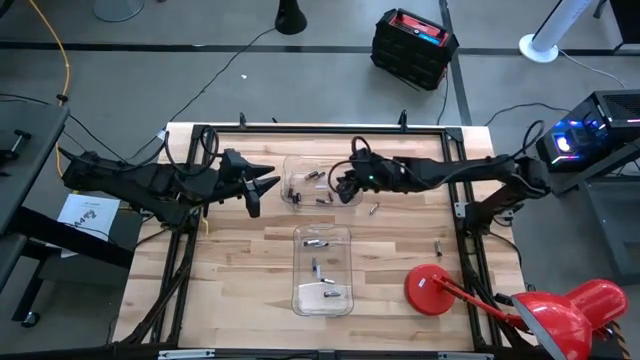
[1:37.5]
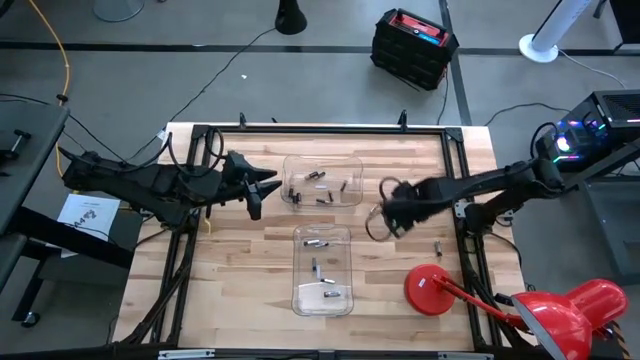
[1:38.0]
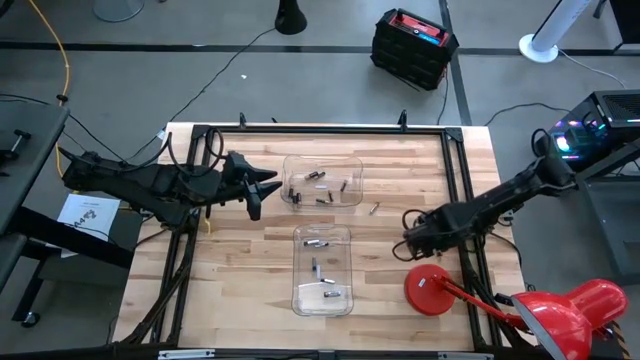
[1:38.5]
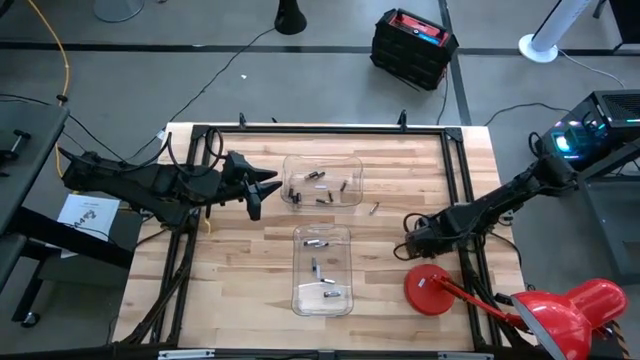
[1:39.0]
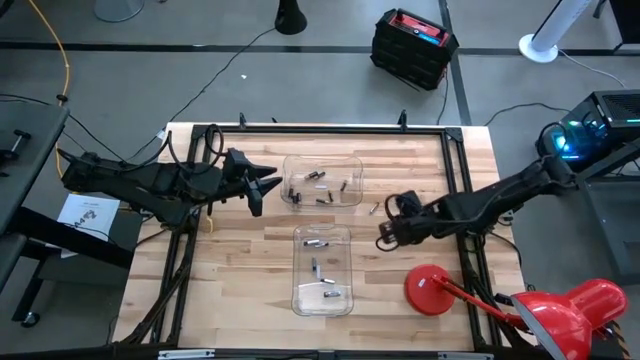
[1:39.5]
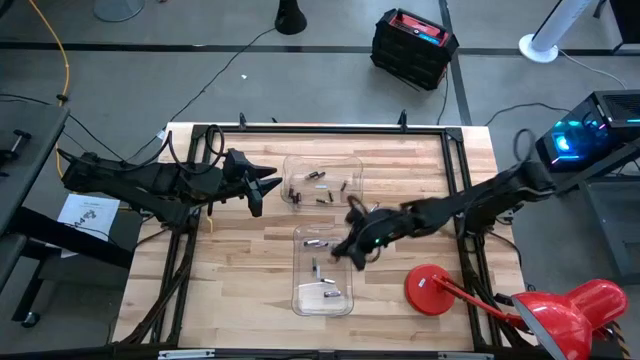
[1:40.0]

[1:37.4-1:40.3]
Task: Sort batteries
Put the silver battery into the bottom transparent bin

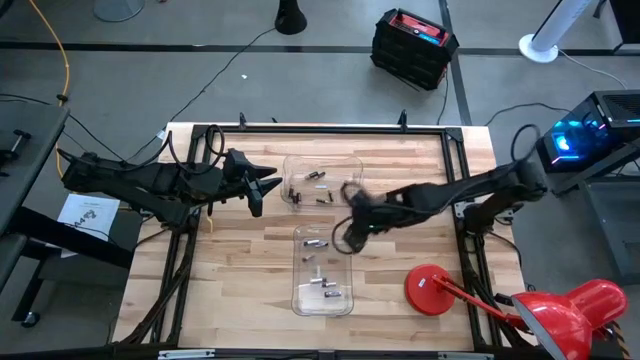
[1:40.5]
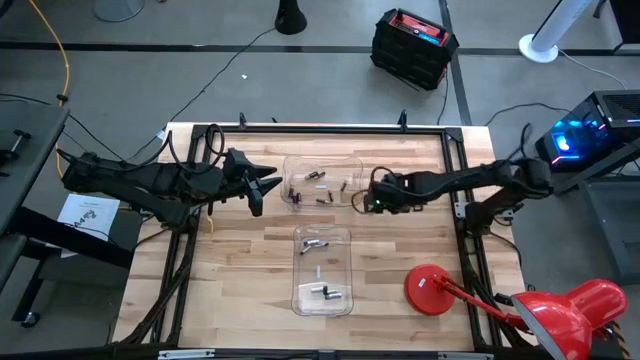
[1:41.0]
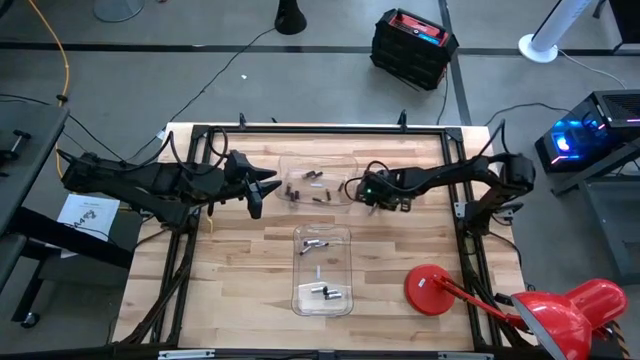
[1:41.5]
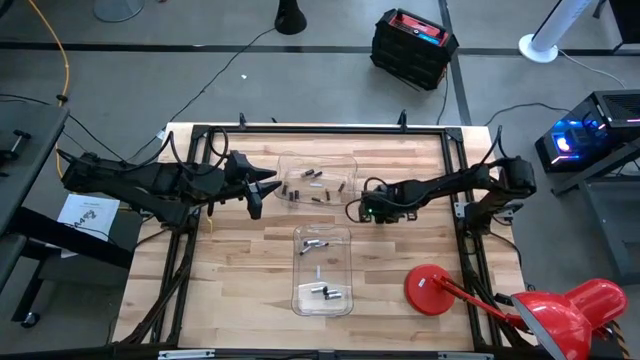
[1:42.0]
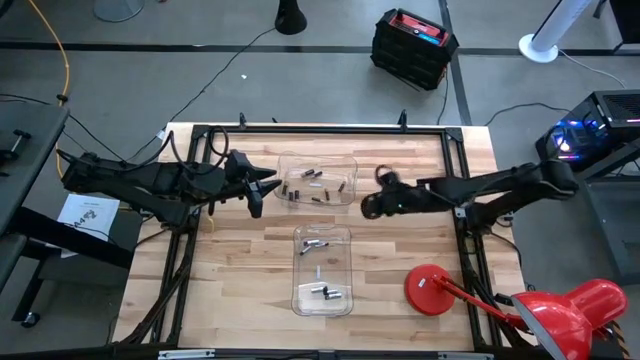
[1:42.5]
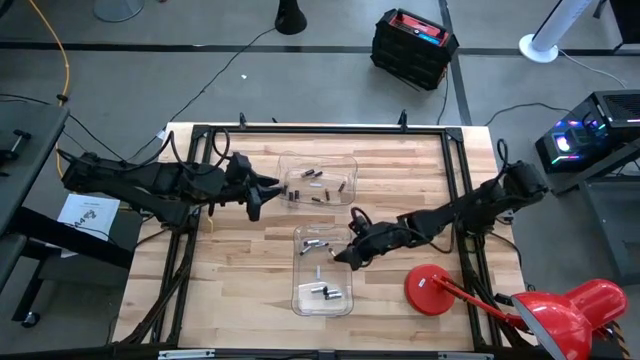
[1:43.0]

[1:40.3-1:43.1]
Put the silver battery into the bottom transparent bin

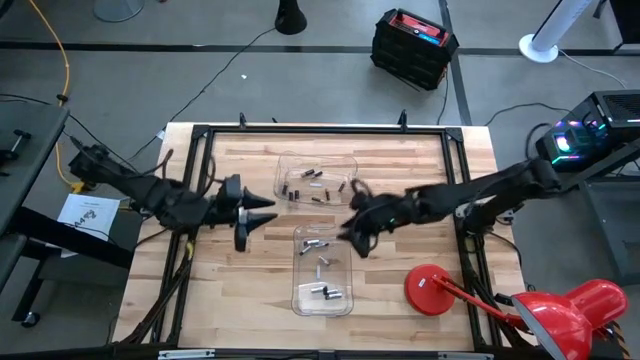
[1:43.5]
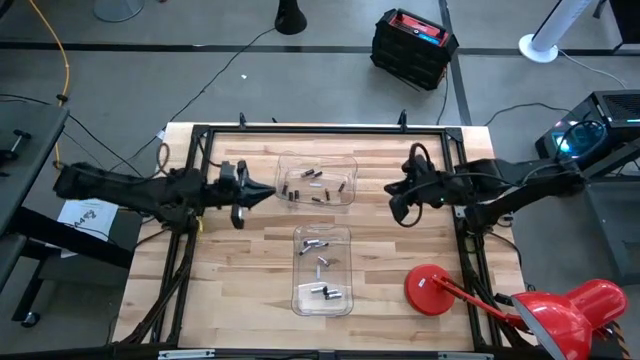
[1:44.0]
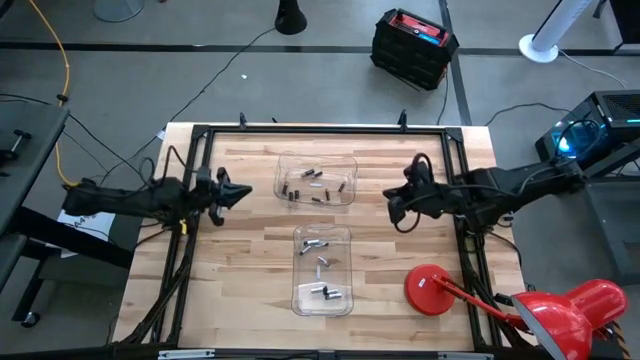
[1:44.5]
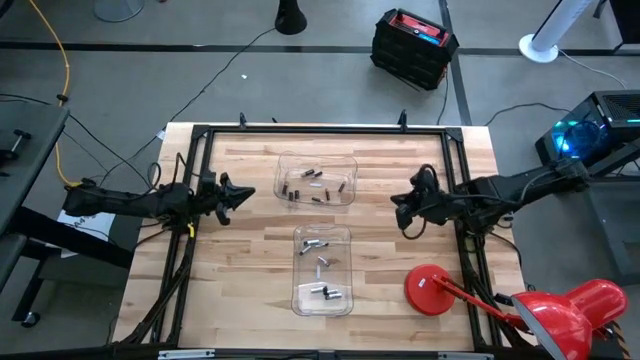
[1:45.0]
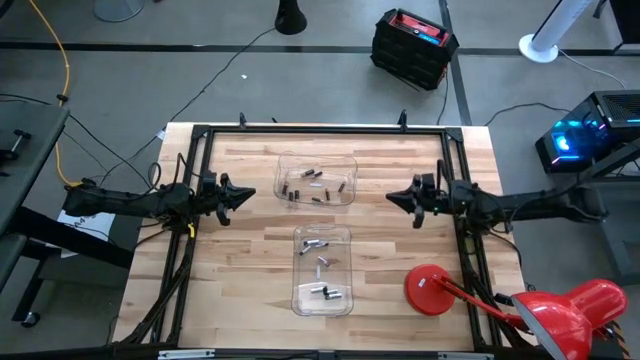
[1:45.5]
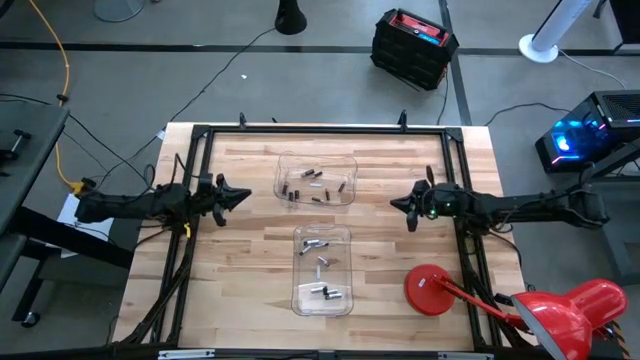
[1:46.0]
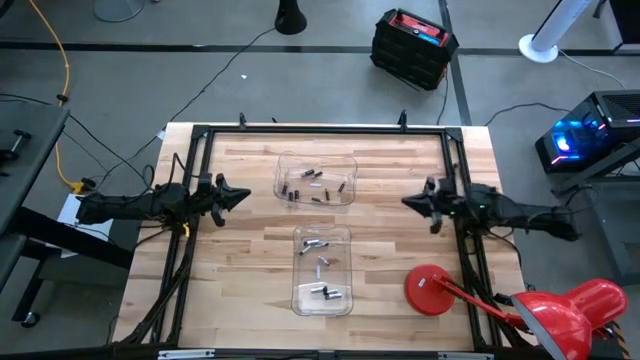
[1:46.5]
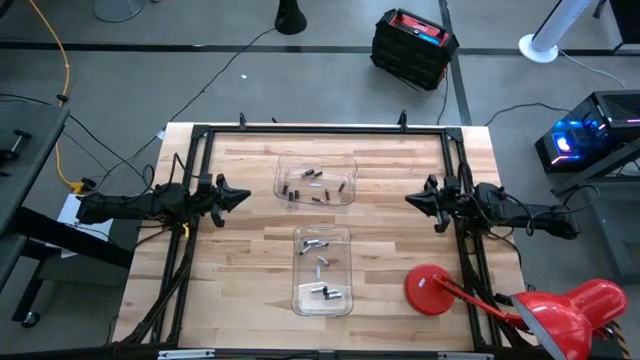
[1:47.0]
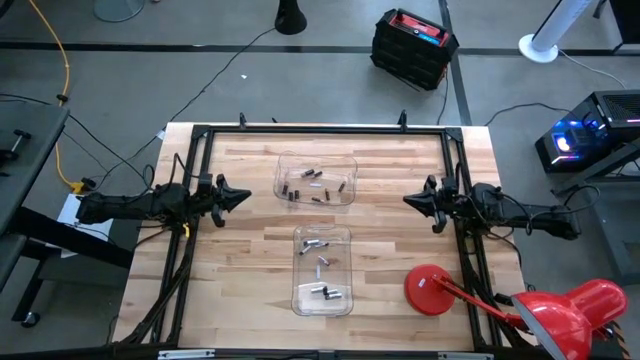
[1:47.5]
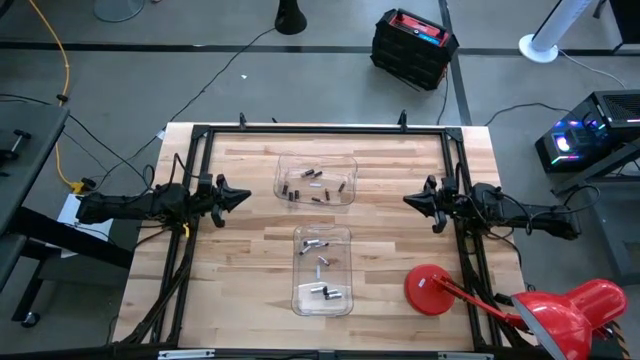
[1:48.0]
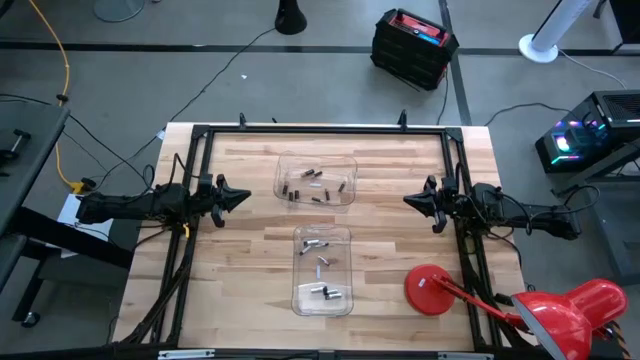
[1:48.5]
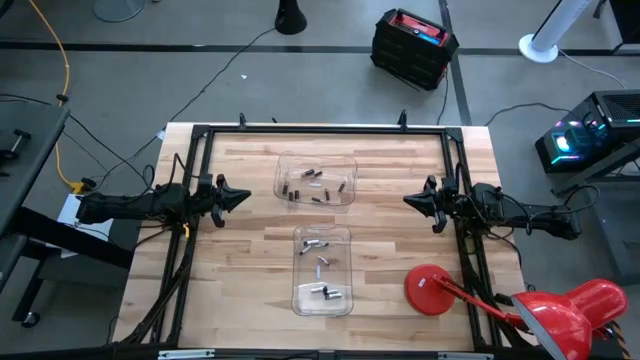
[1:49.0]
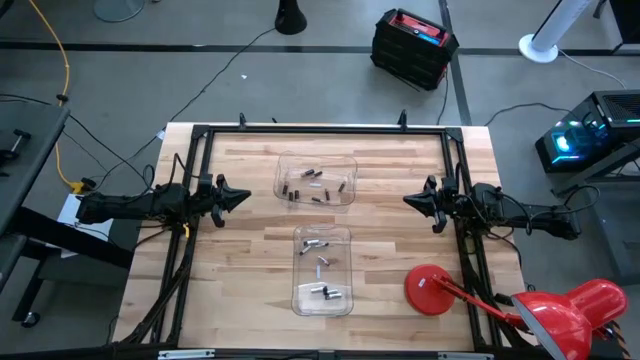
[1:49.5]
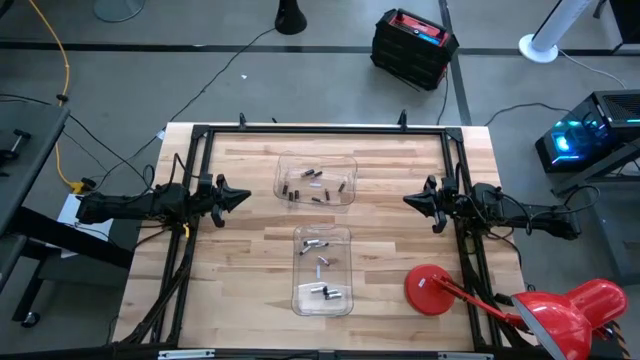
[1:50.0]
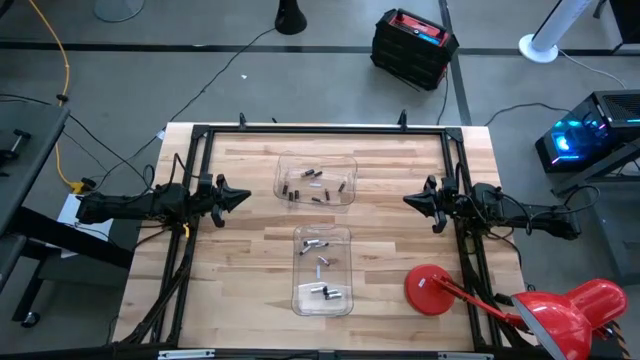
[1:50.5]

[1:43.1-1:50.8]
Return to Home Position

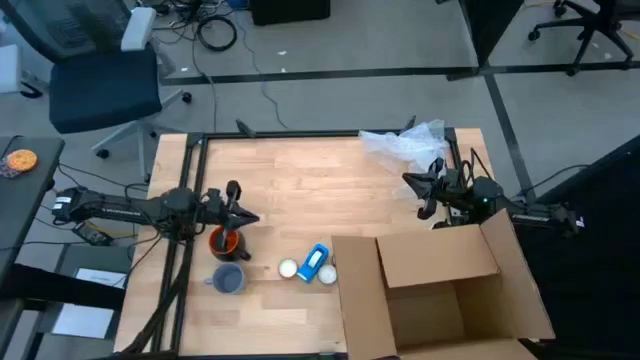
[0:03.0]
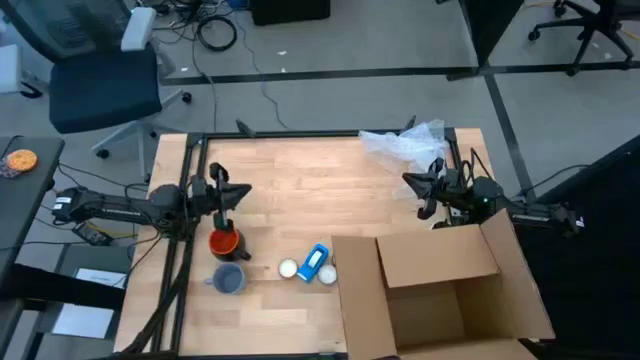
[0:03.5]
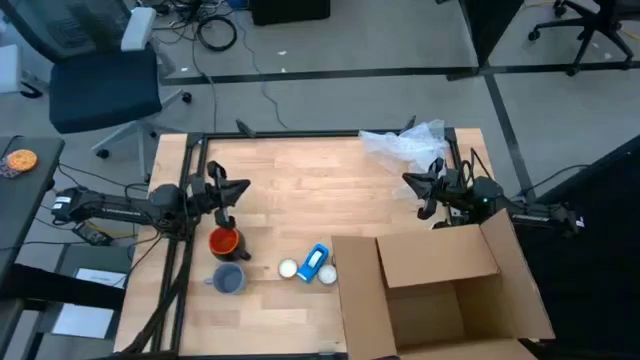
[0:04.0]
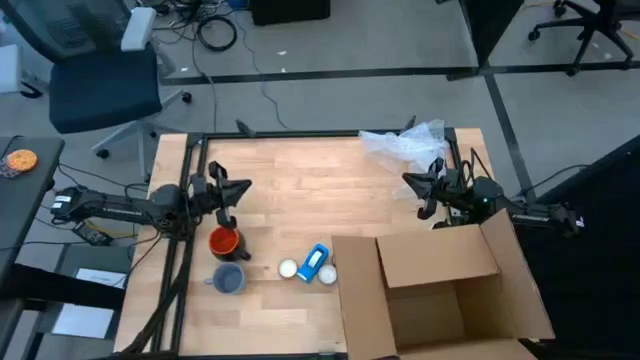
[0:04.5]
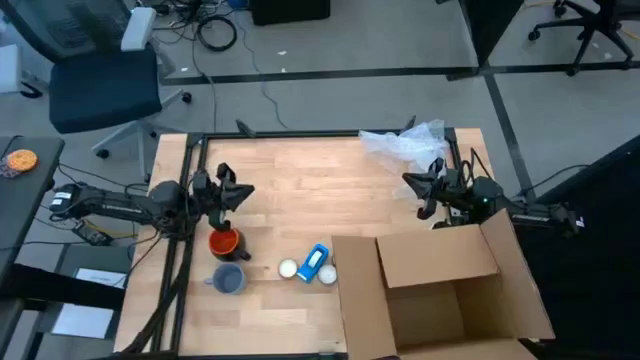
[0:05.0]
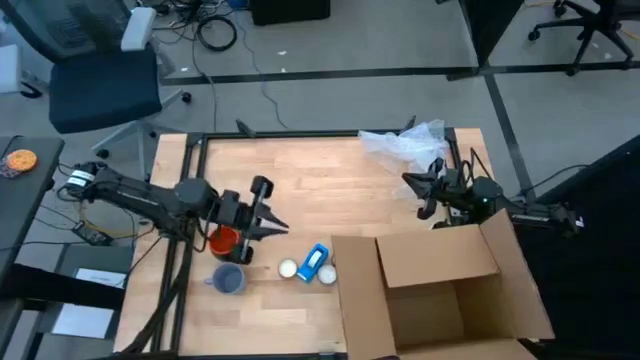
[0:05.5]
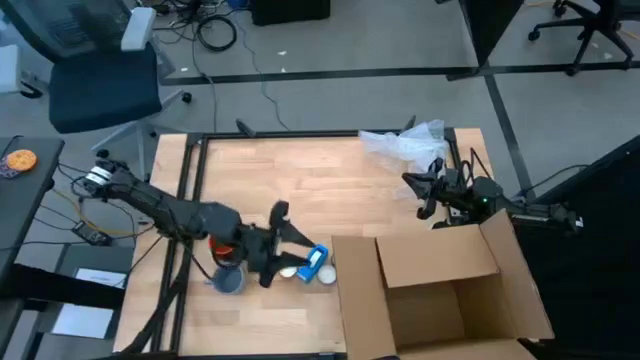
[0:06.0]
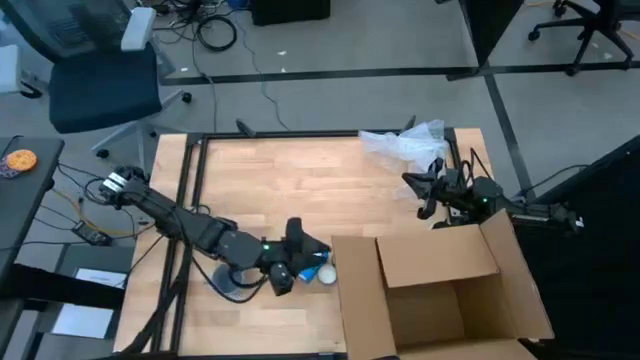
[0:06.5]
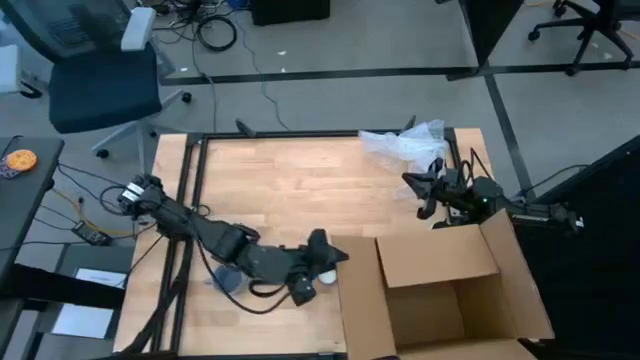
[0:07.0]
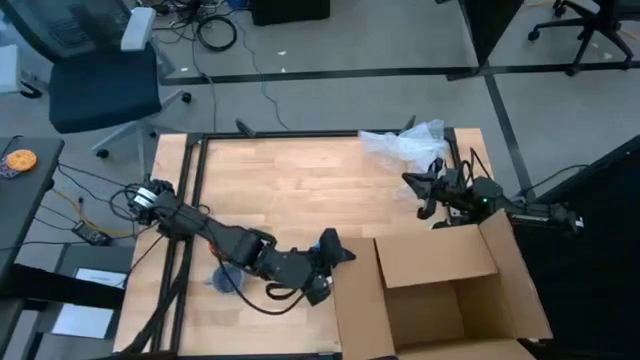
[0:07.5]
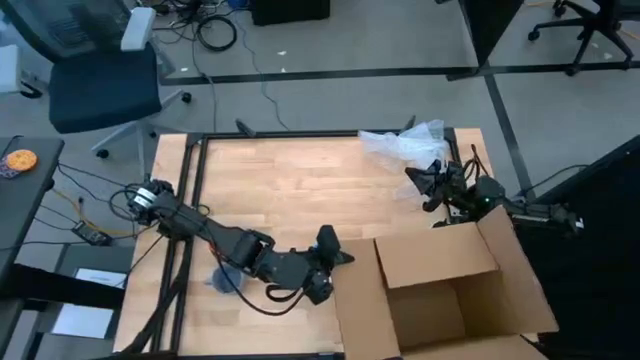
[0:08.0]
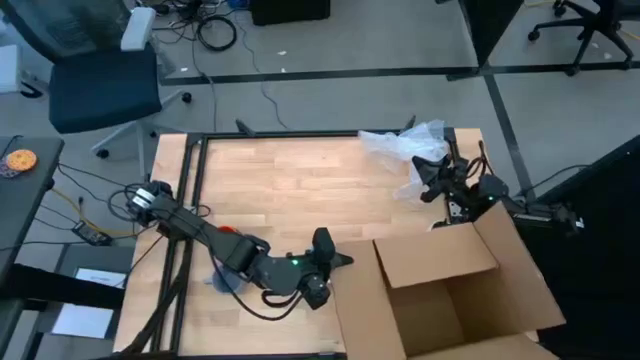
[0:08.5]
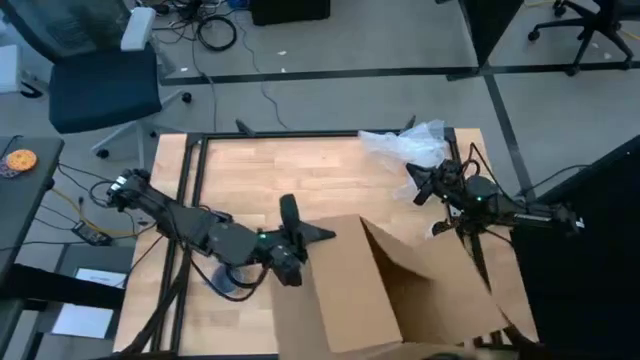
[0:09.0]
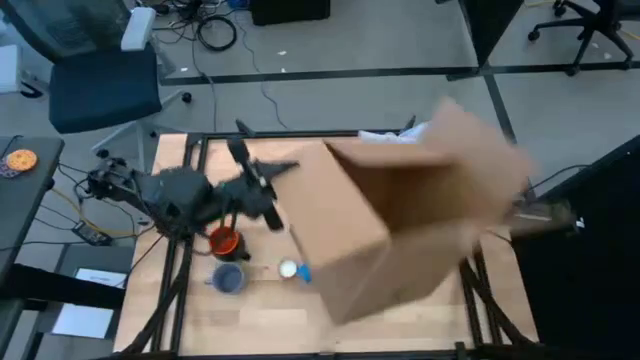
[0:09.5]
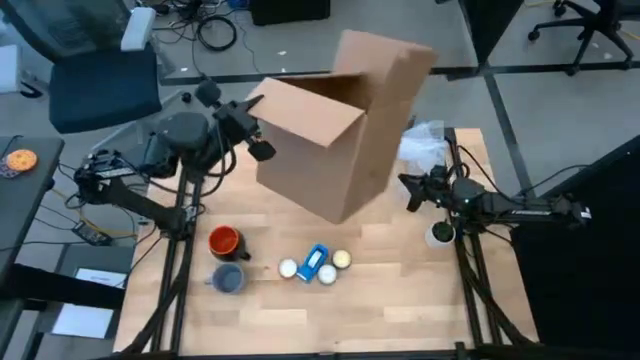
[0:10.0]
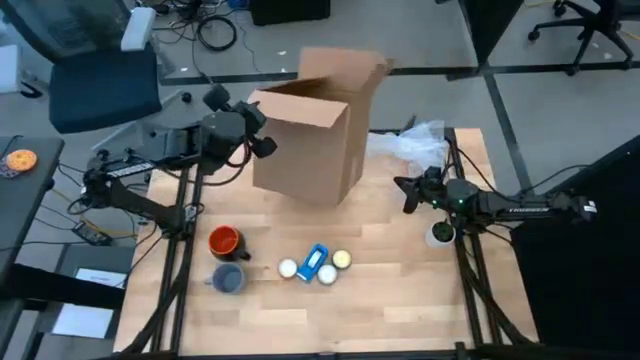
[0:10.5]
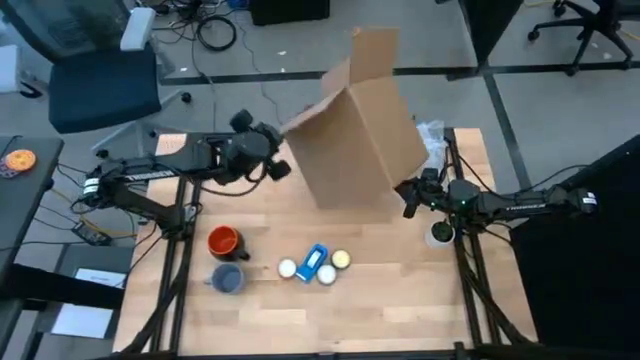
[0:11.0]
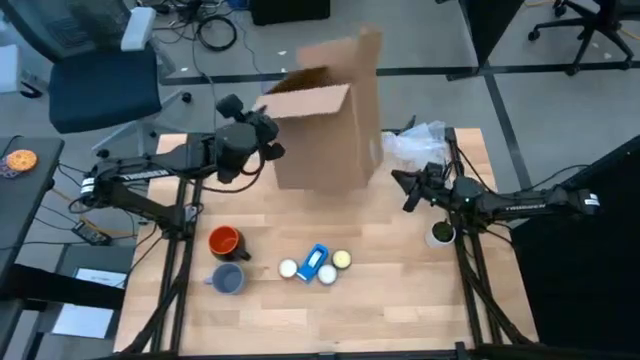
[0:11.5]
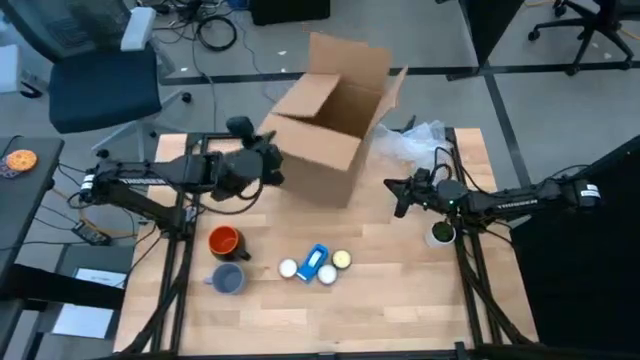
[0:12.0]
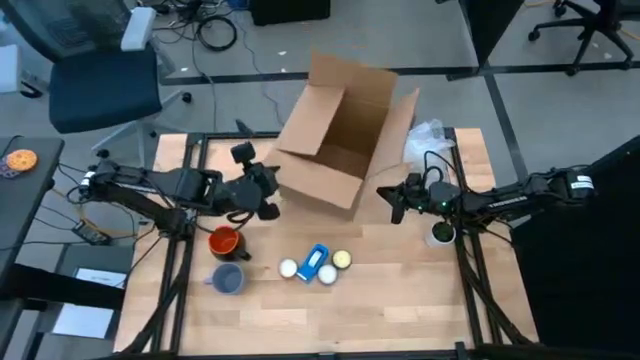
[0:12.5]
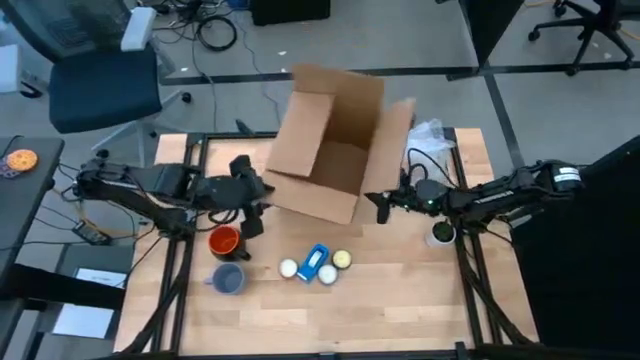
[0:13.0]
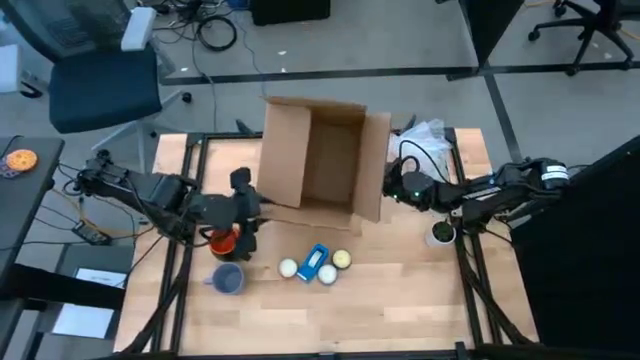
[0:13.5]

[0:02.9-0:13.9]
Task: wrap mug
Move the box to the top of the table
